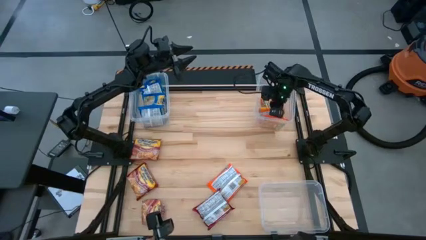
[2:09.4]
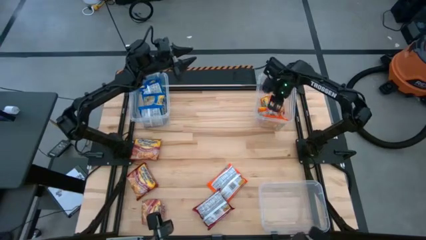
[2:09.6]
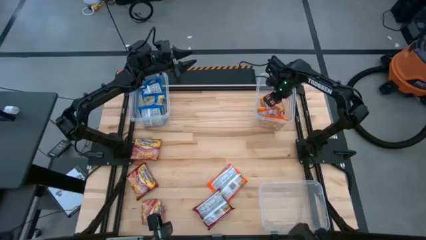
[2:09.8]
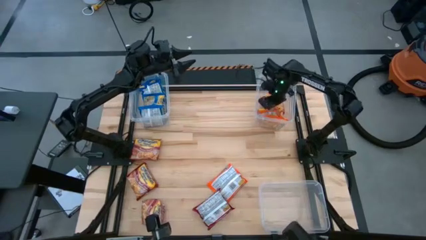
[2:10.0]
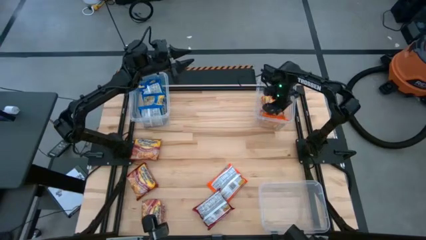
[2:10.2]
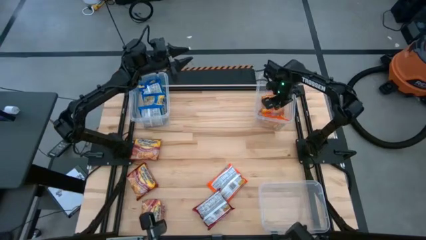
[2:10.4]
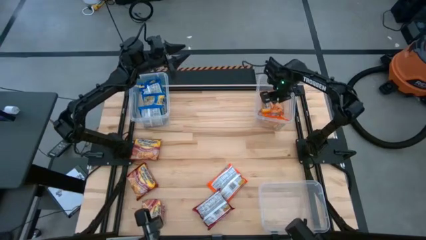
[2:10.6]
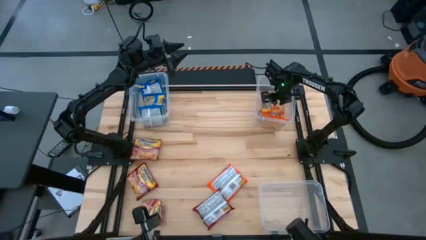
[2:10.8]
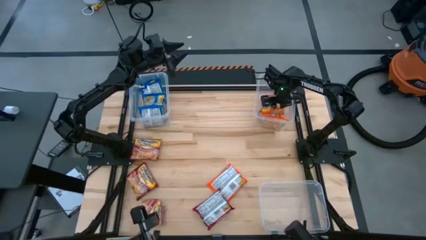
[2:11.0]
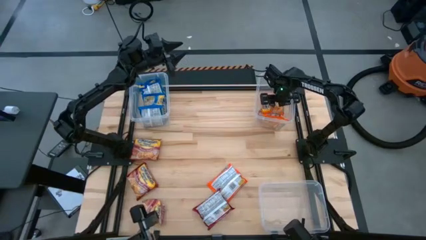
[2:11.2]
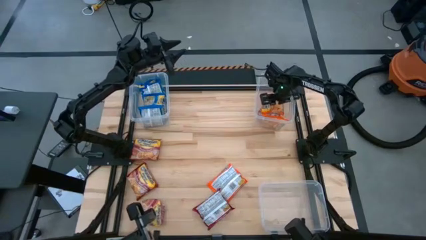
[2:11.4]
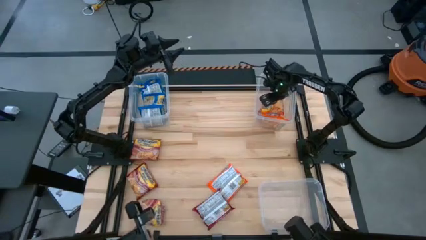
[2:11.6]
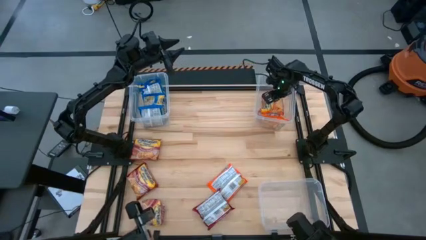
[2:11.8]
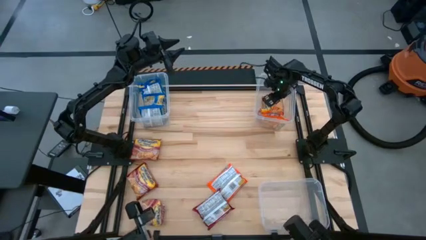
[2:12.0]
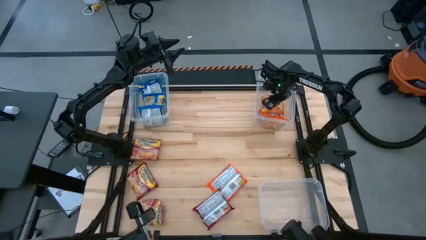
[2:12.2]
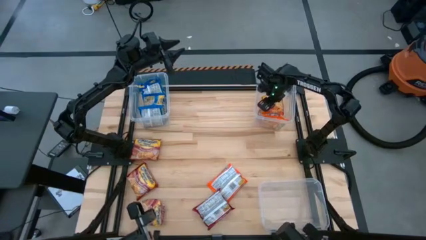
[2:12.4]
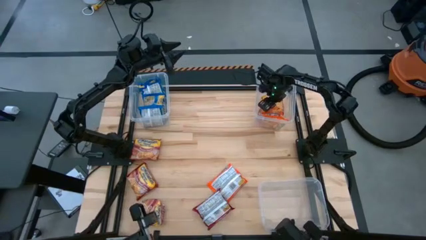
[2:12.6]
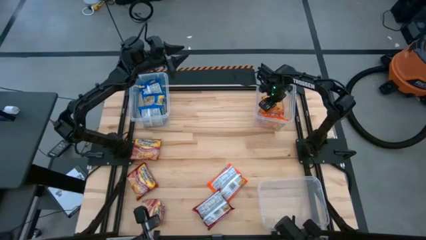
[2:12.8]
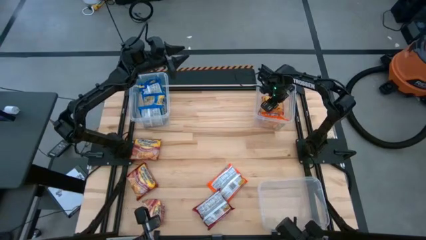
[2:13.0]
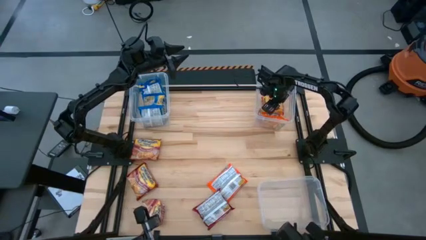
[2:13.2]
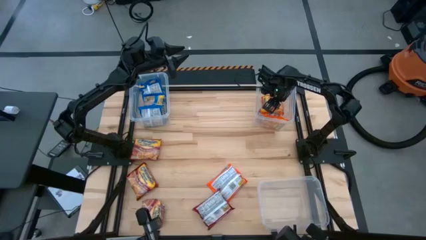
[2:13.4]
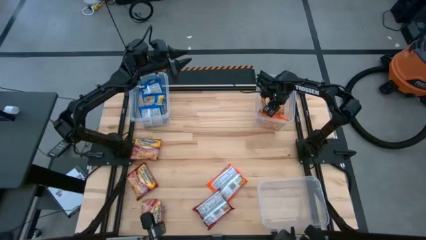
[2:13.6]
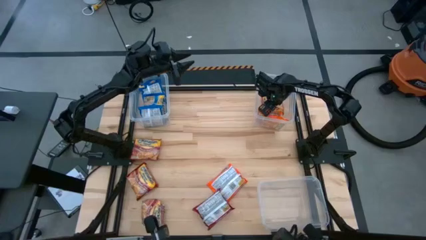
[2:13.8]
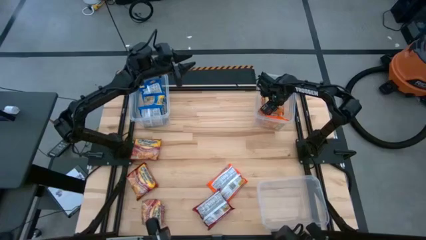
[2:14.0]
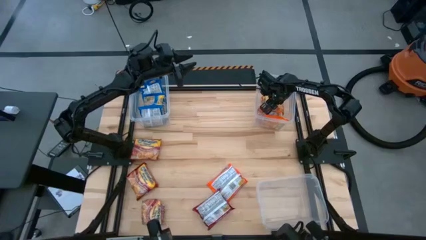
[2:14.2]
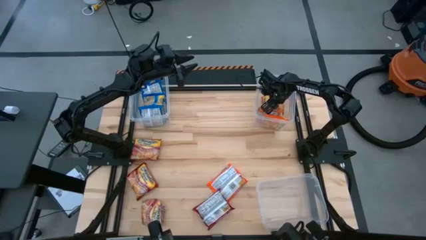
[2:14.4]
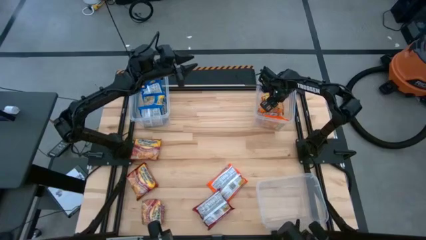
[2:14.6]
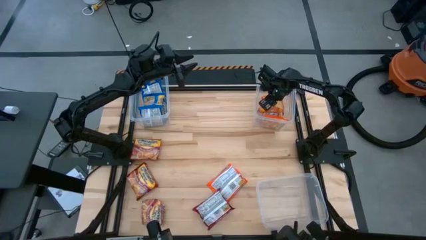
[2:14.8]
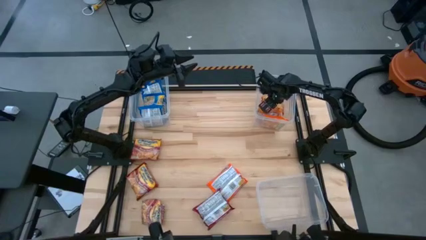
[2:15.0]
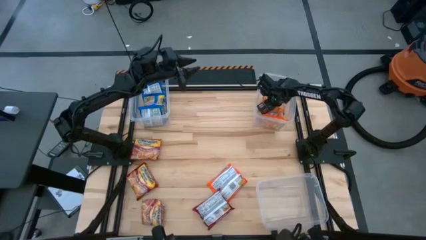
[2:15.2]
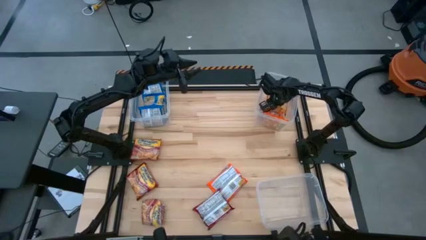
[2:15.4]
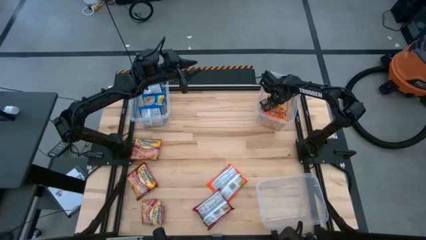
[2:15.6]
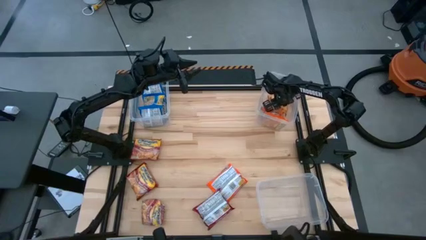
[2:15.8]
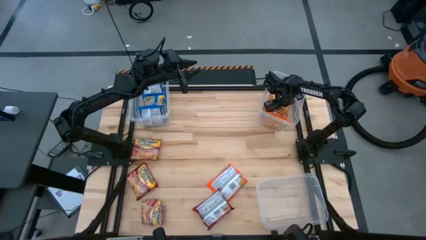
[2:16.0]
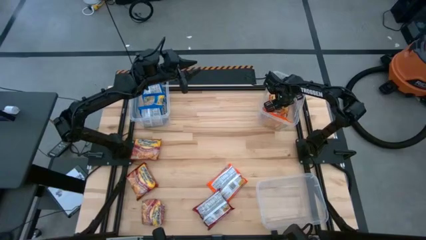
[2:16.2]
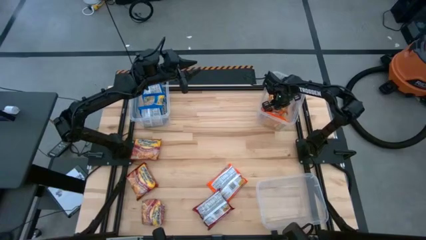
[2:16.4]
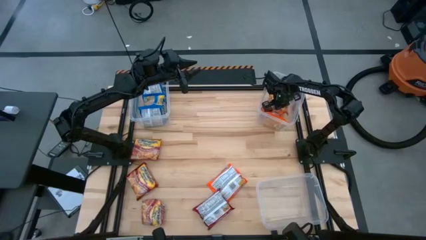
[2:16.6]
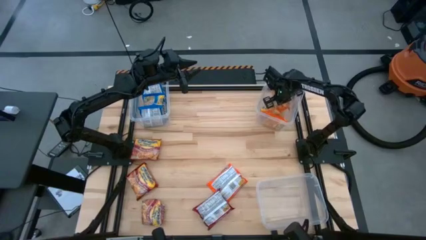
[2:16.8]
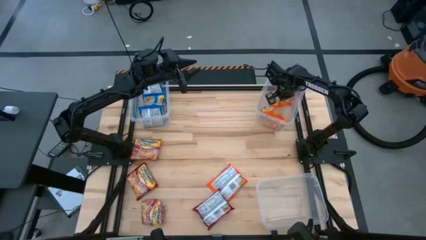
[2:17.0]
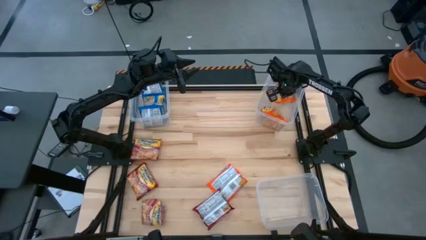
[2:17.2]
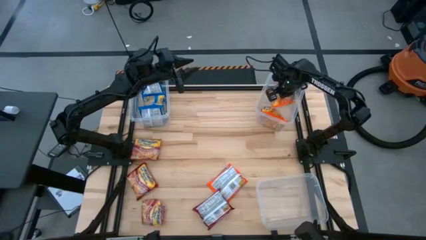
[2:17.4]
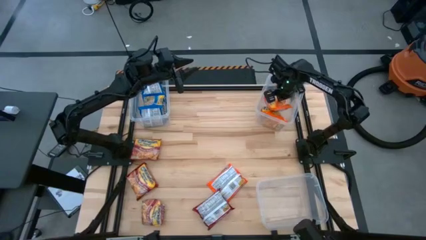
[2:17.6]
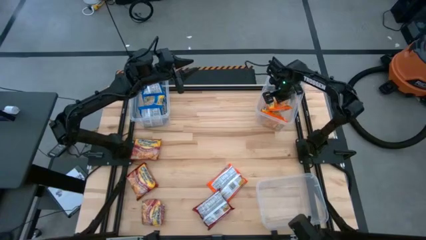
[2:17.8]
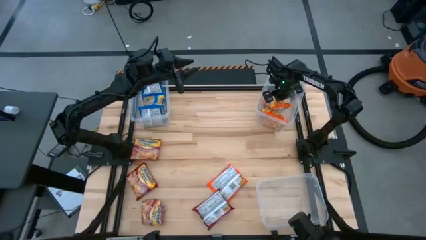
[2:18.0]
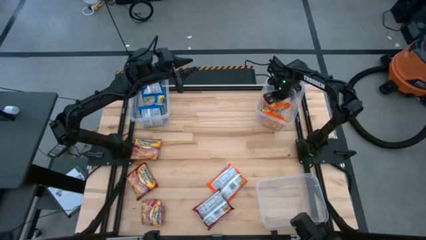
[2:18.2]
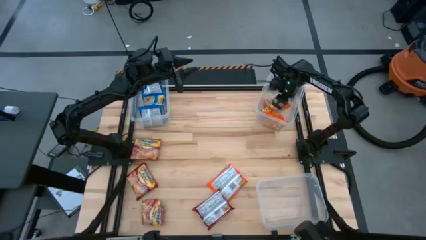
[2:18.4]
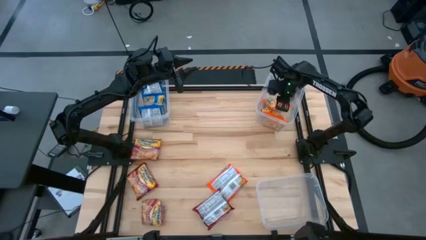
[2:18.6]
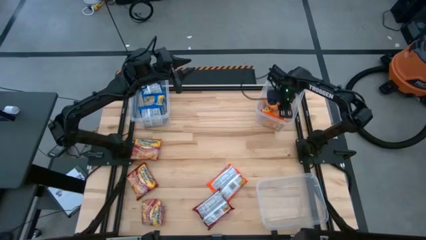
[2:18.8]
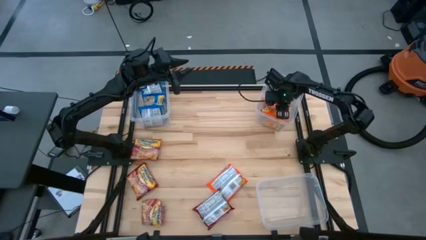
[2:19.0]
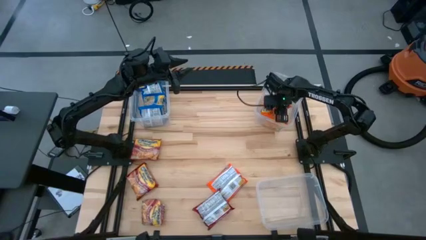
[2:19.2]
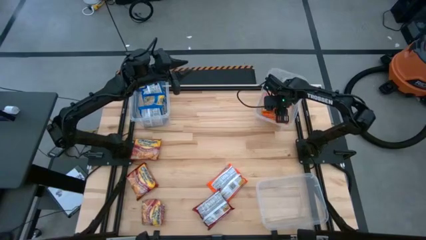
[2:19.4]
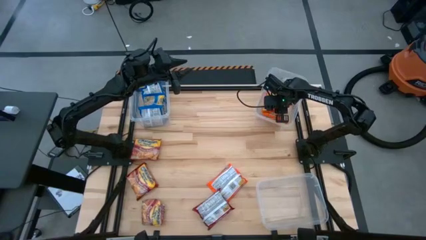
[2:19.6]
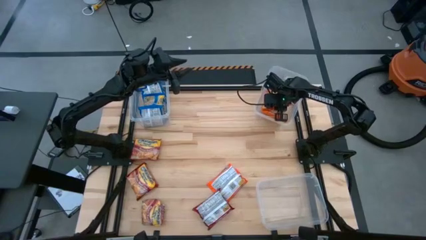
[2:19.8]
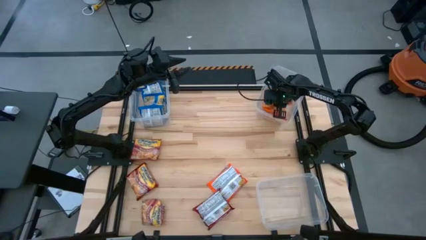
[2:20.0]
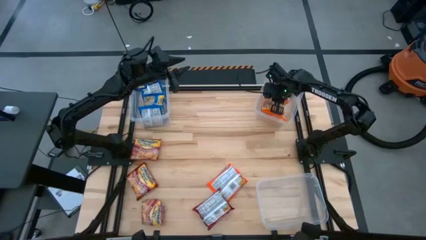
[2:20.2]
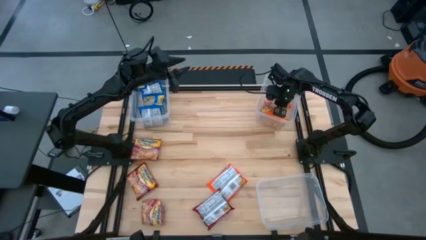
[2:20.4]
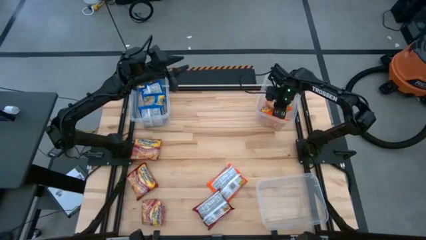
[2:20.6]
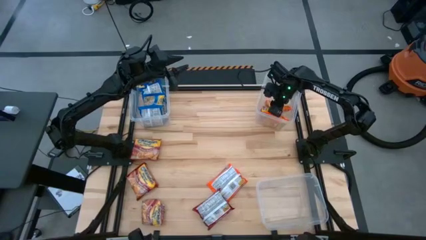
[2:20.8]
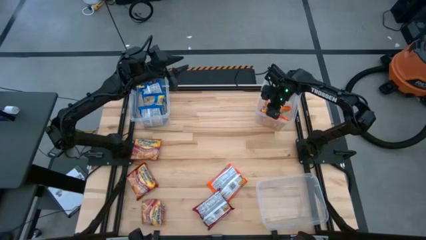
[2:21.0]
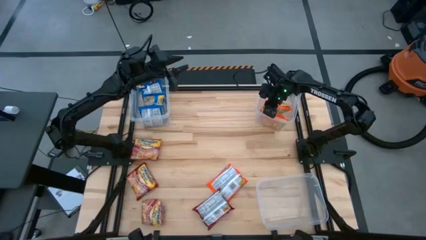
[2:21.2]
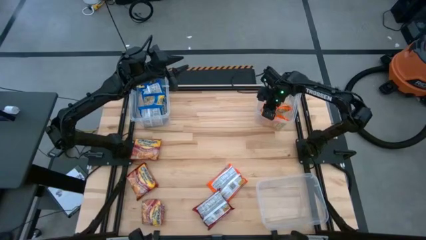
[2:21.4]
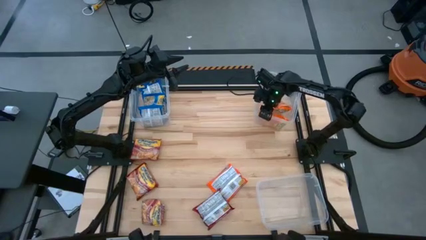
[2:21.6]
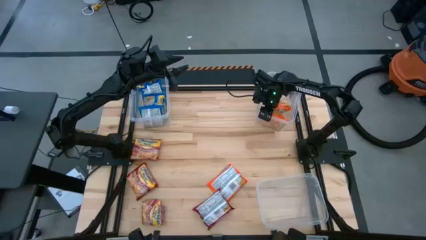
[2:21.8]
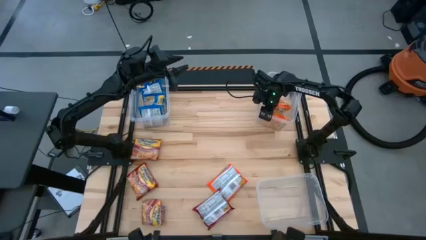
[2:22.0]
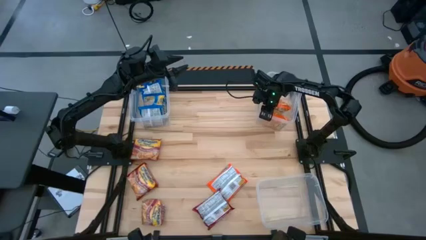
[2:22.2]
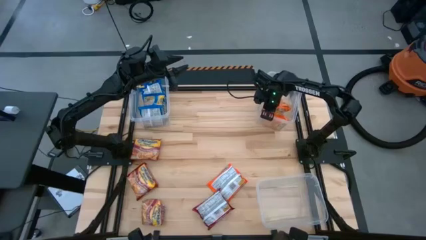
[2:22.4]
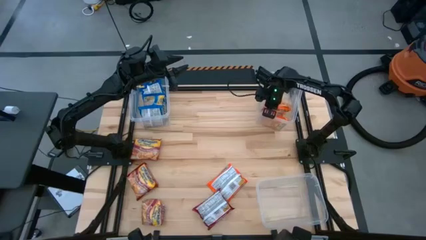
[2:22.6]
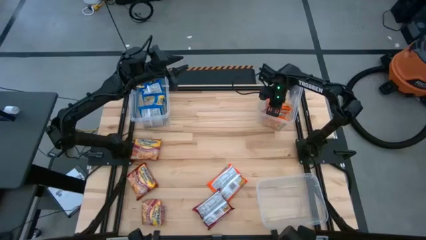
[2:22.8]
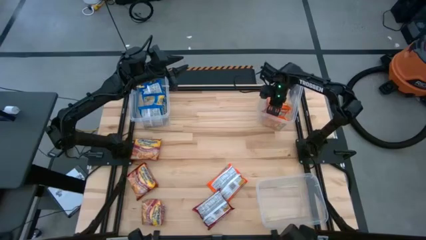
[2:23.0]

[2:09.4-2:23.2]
Task: Sort Maruchan noodles
Adjust the orange noodle packs in the top right transparent bin
